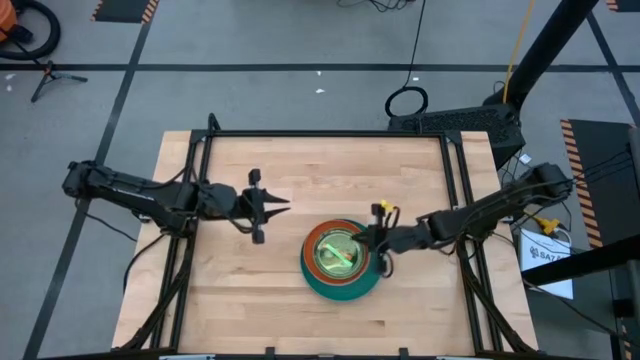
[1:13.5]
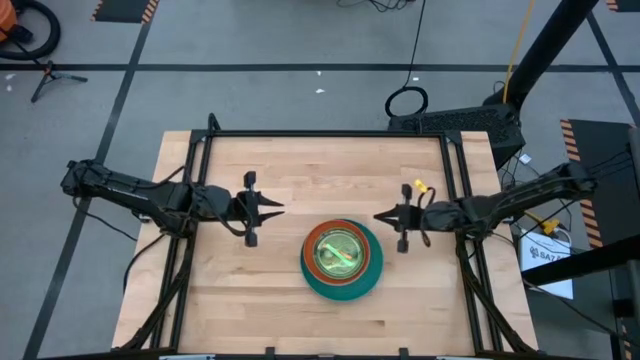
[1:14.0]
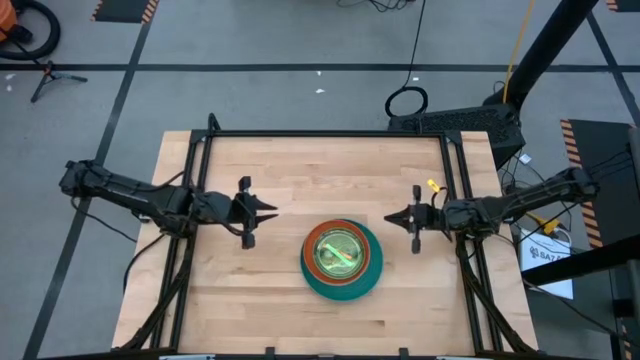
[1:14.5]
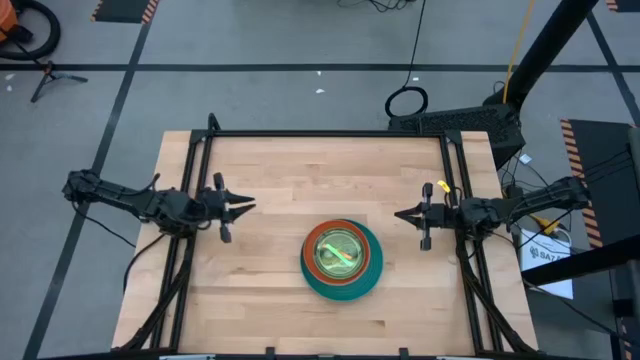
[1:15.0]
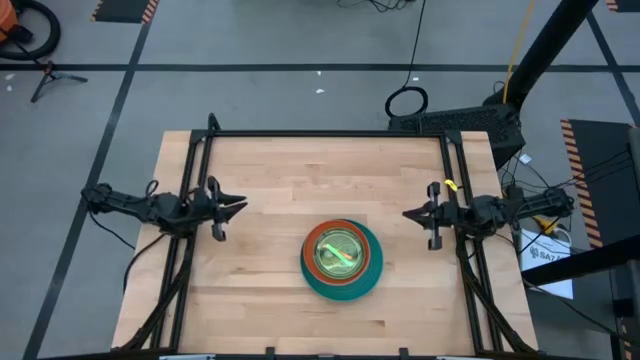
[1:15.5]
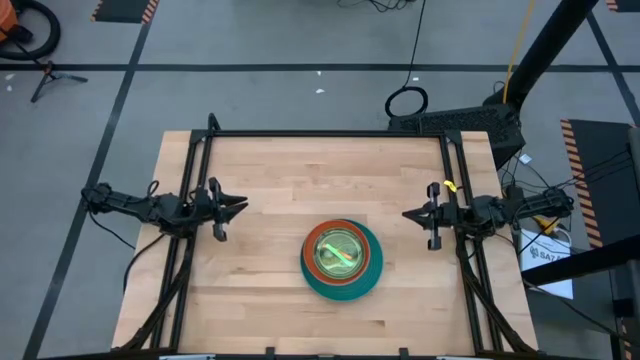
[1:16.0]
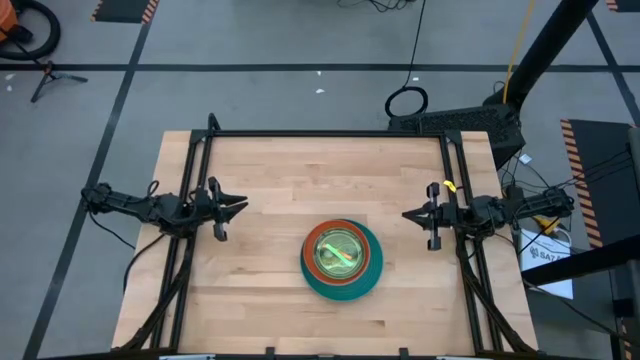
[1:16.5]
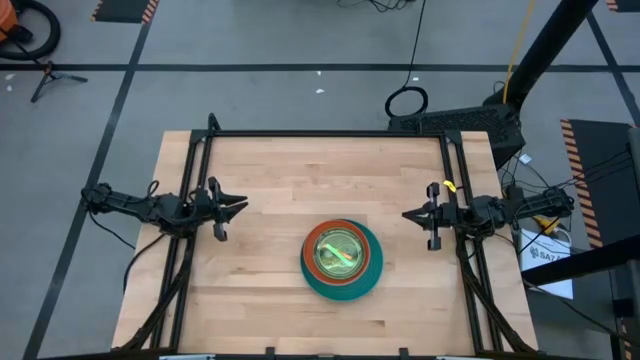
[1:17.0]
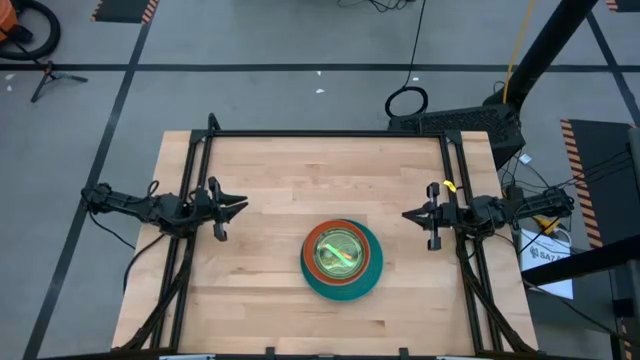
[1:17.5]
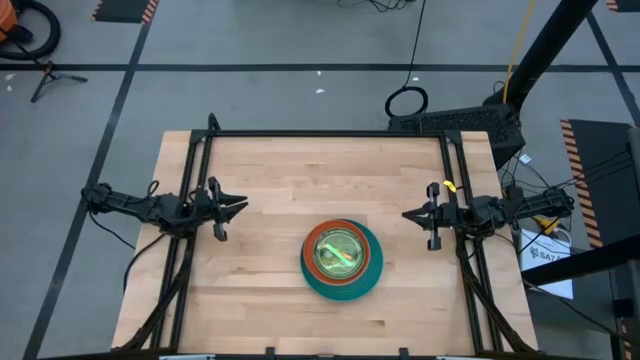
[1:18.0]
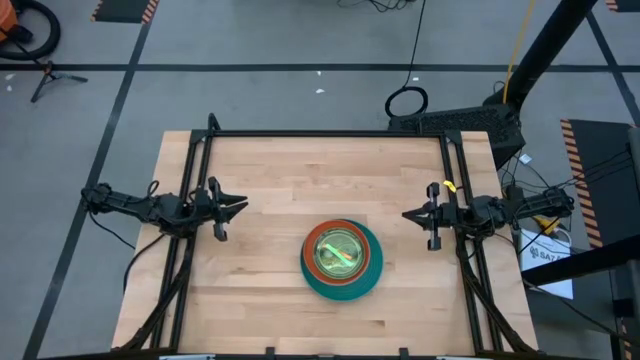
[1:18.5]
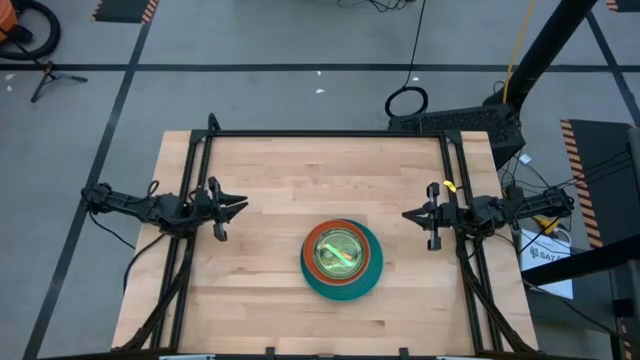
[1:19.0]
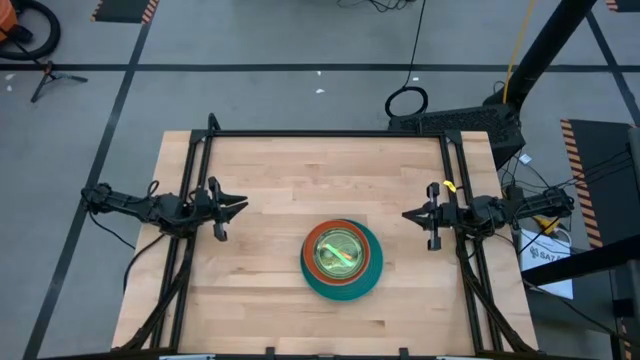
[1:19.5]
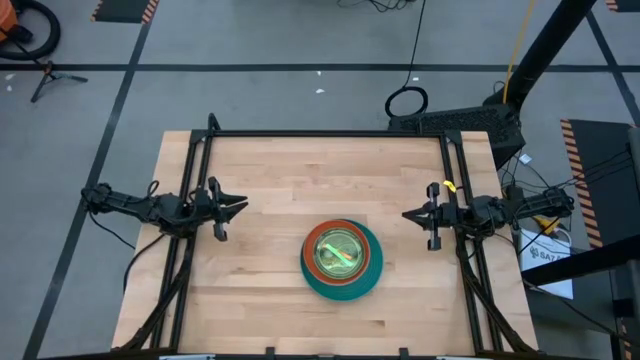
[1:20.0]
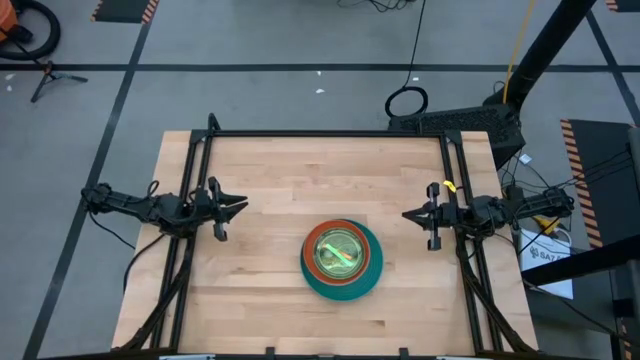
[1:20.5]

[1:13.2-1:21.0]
Task: Stack plastic plates
Return to Home Position

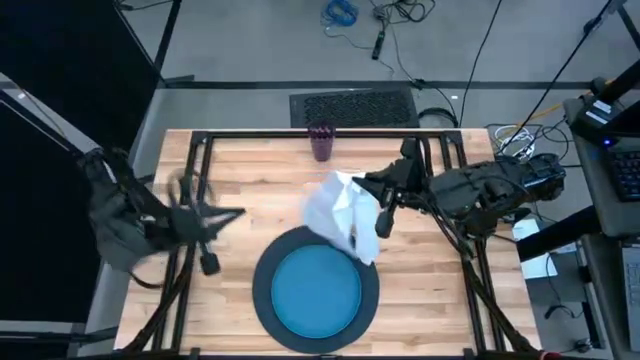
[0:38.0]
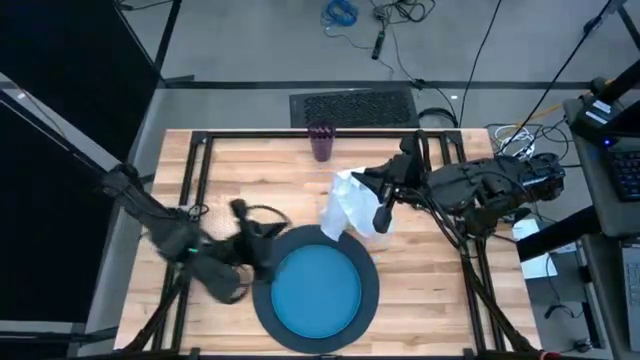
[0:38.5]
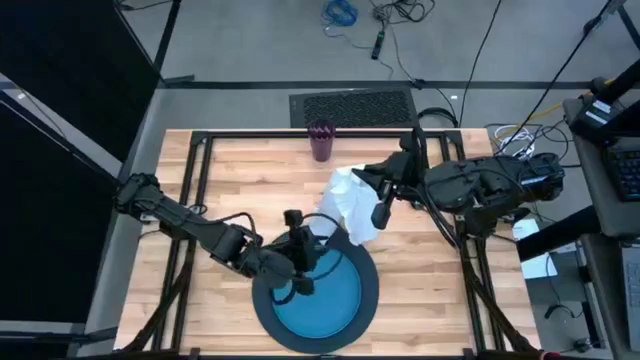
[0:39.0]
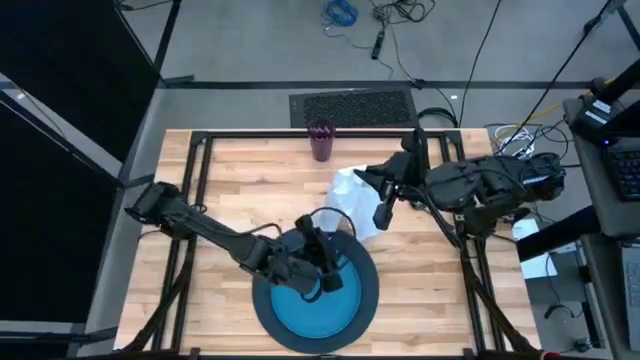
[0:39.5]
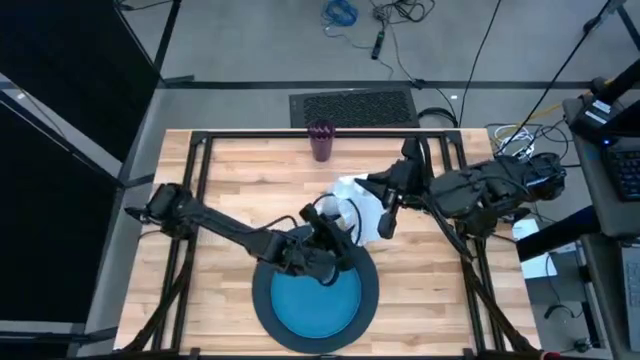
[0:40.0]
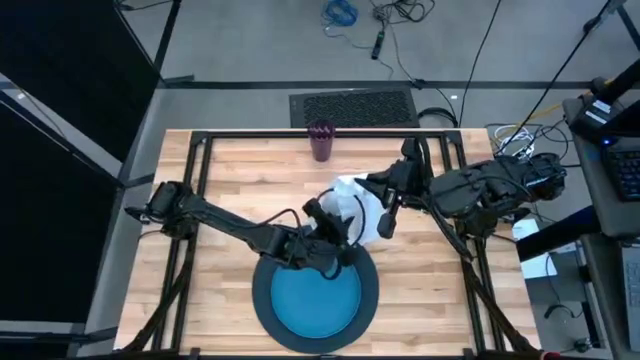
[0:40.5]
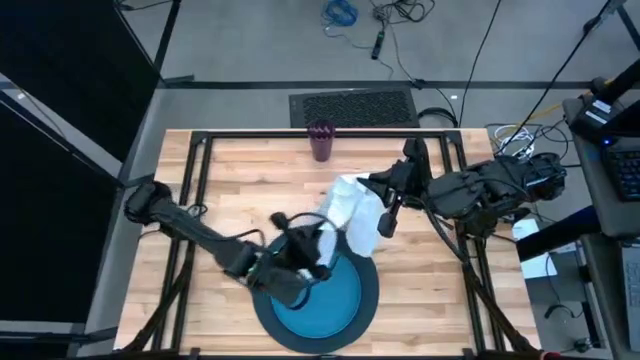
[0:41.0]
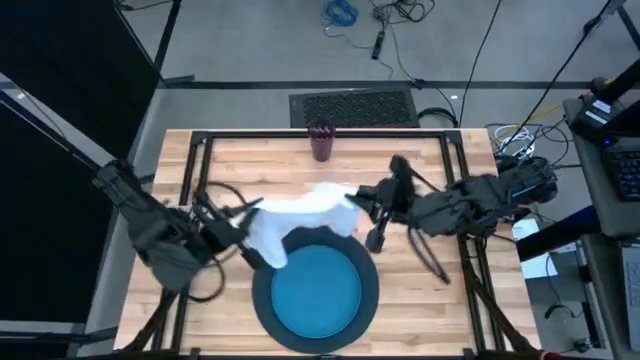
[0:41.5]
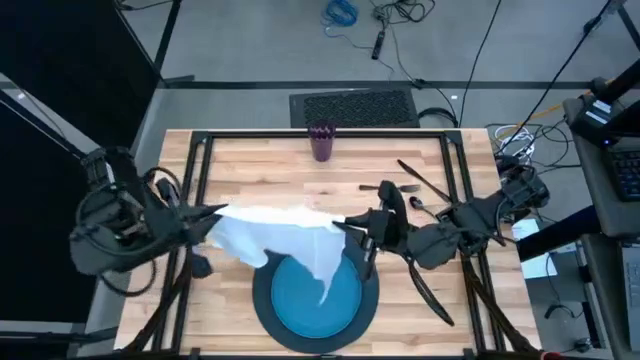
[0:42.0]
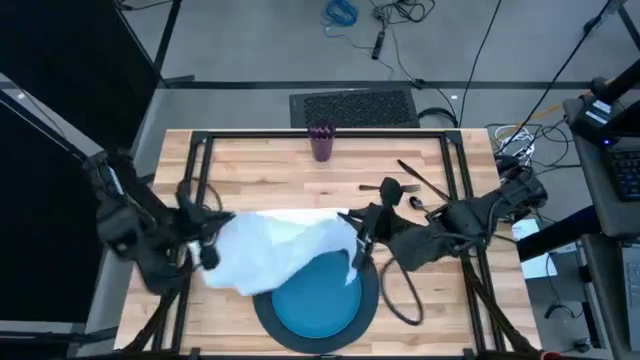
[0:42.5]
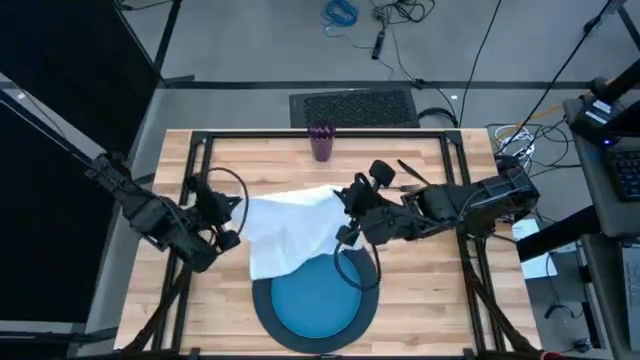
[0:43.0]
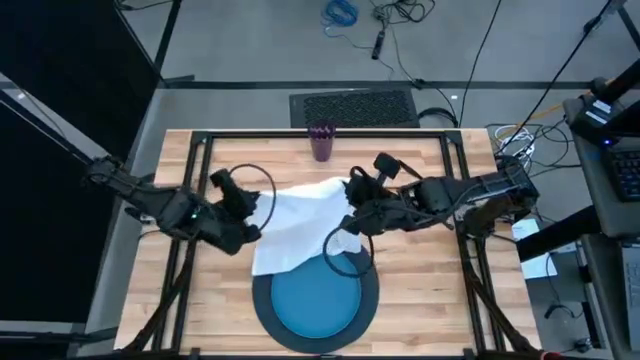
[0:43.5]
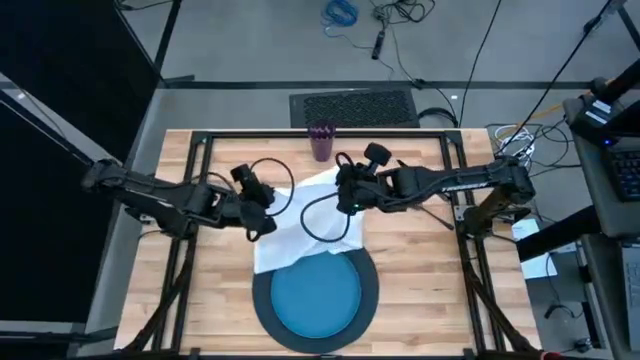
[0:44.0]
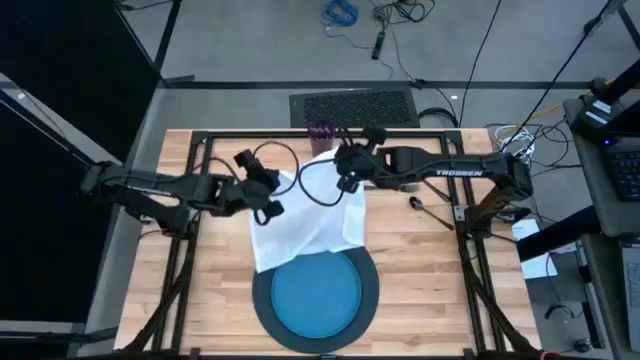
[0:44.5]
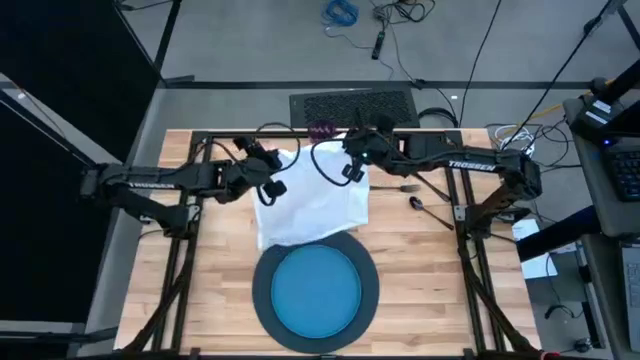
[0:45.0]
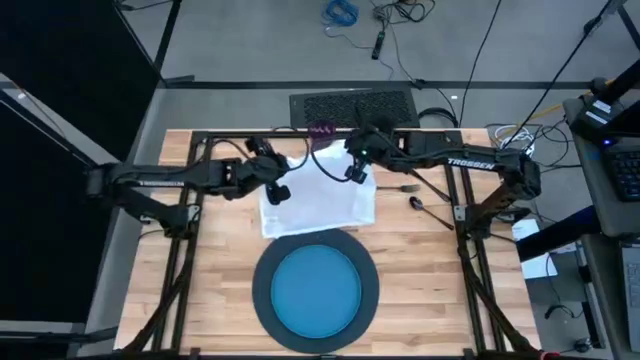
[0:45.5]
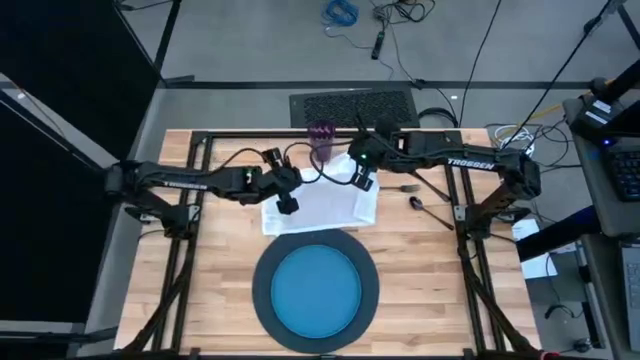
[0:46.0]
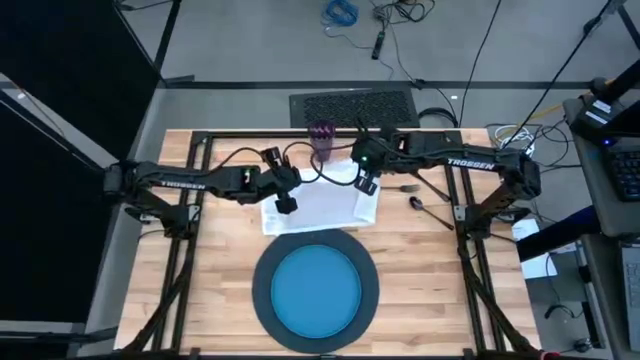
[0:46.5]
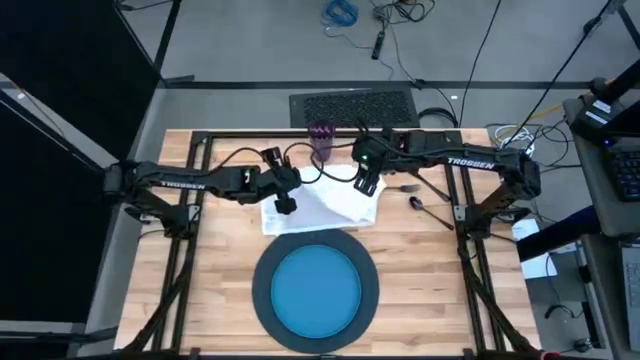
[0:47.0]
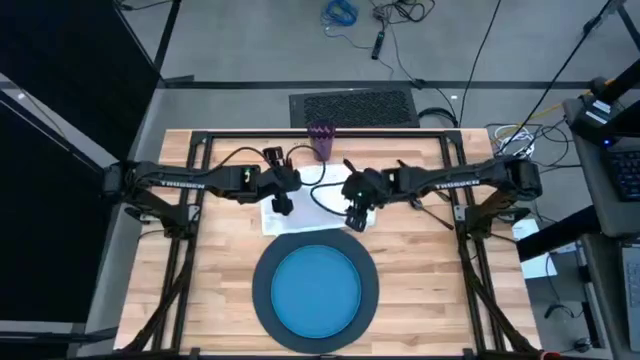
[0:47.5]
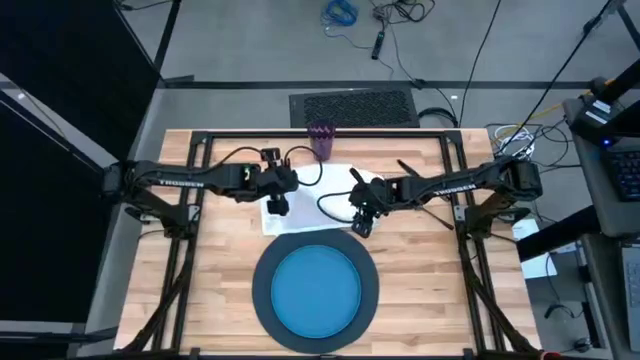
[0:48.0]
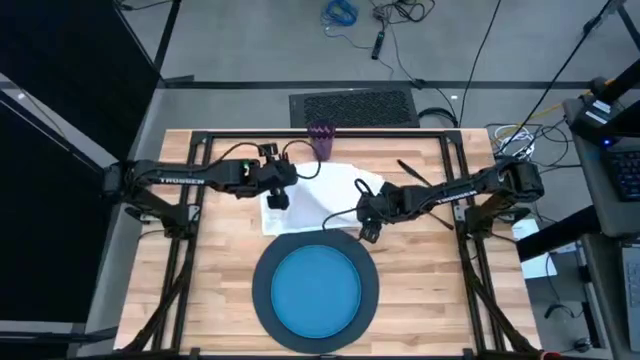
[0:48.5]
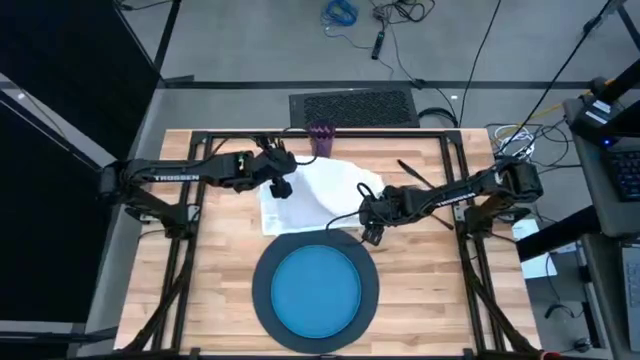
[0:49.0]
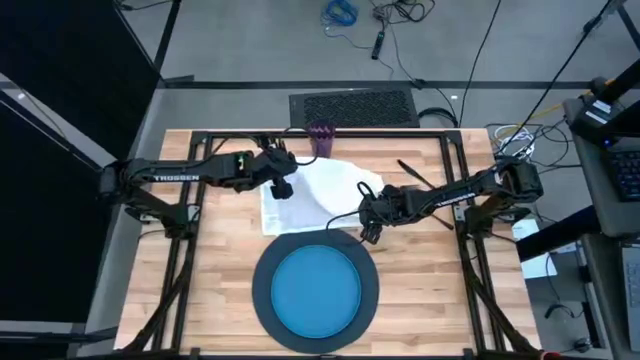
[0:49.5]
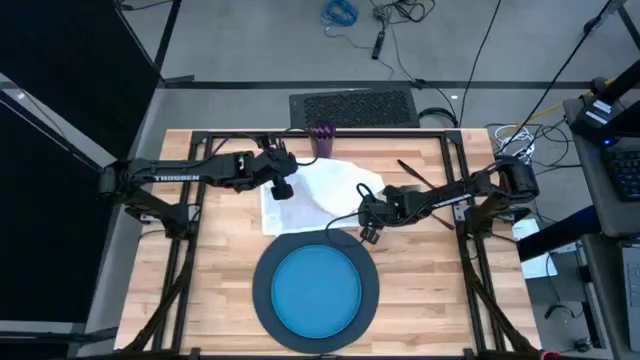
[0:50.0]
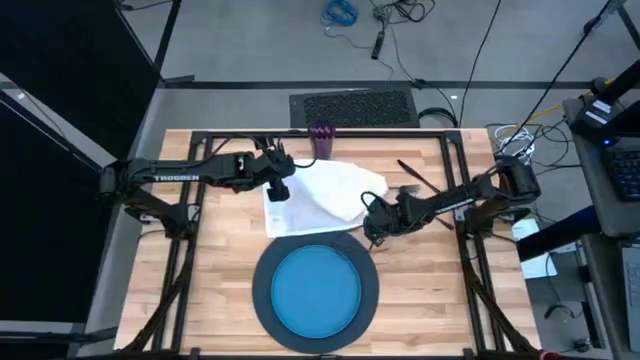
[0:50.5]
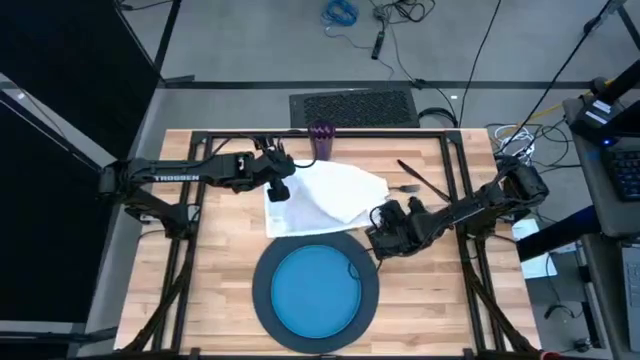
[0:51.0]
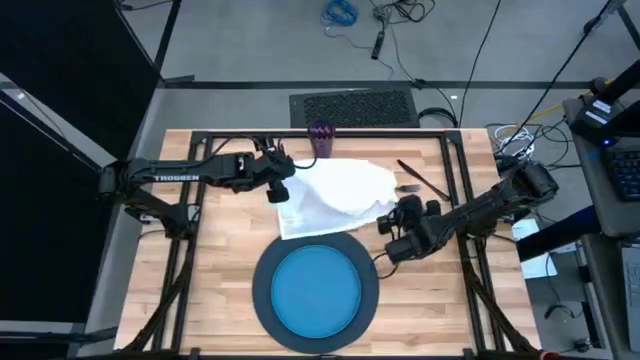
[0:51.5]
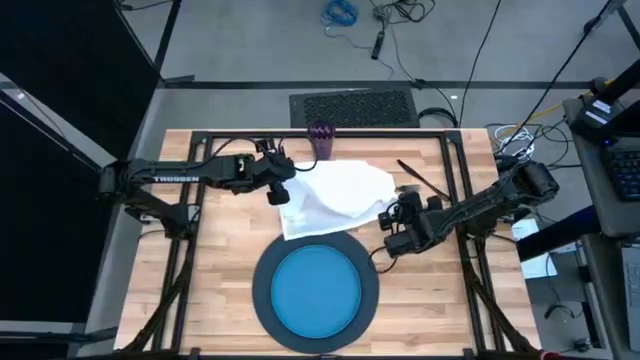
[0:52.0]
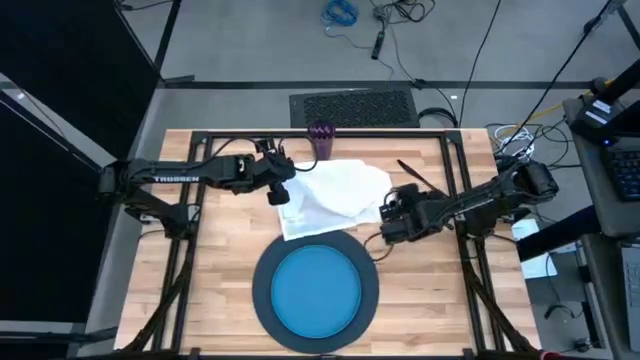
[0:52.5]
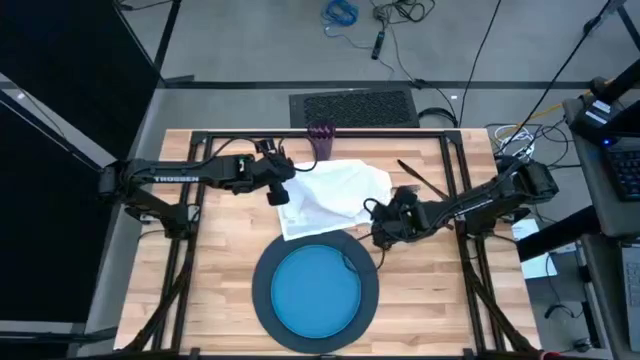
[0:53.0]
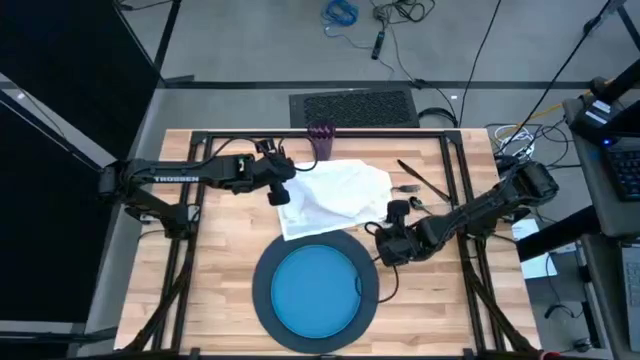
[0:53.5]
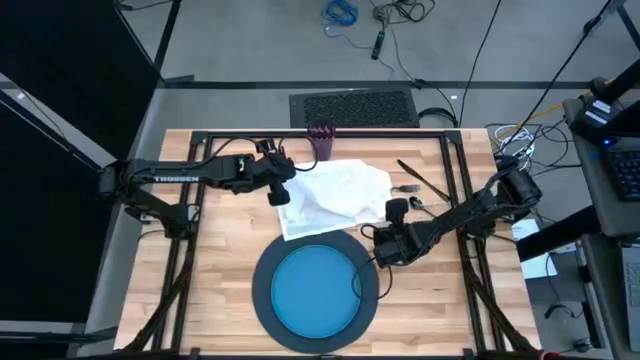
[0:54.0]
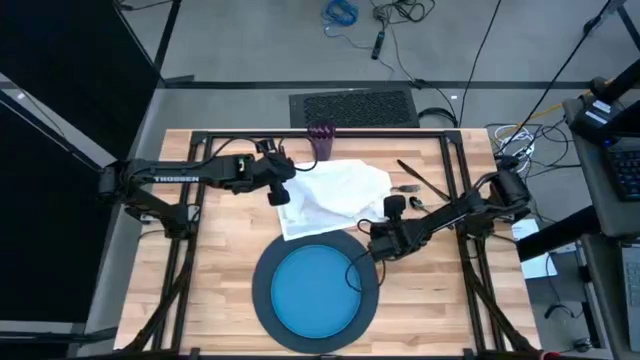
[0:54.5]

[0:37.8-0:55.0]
Task: Set table place
Fold the white table napkin on the table
